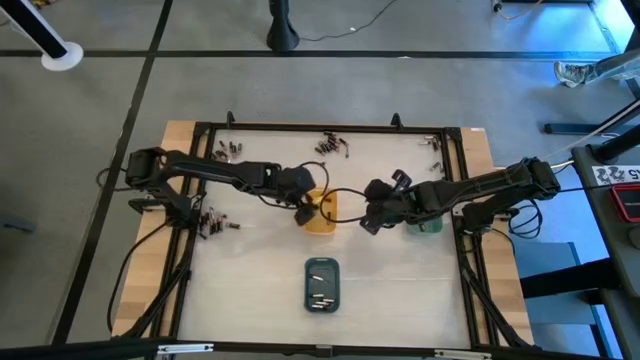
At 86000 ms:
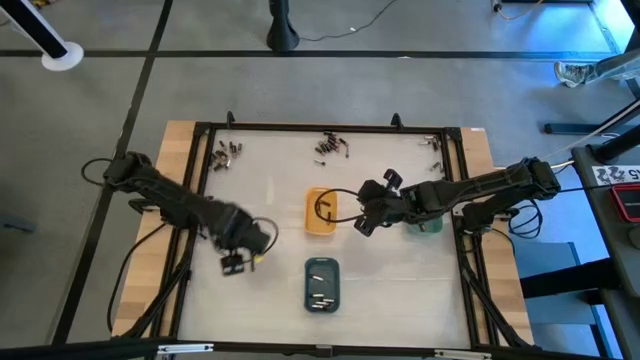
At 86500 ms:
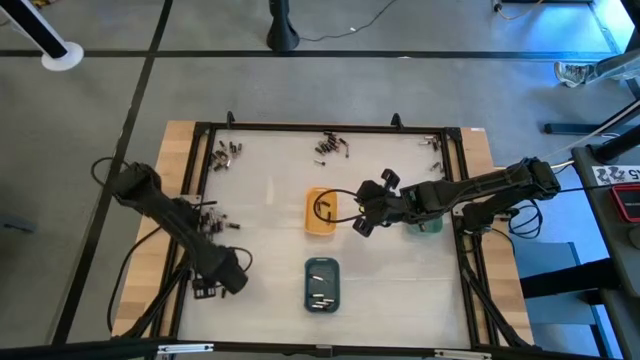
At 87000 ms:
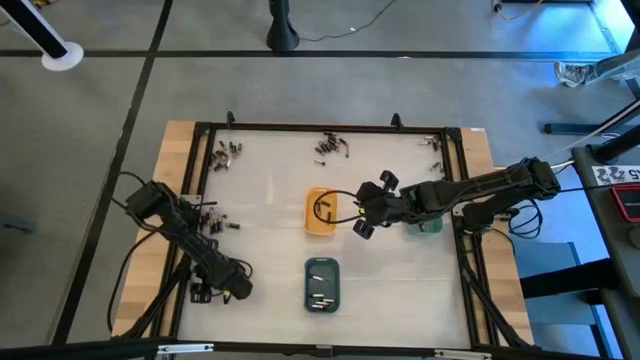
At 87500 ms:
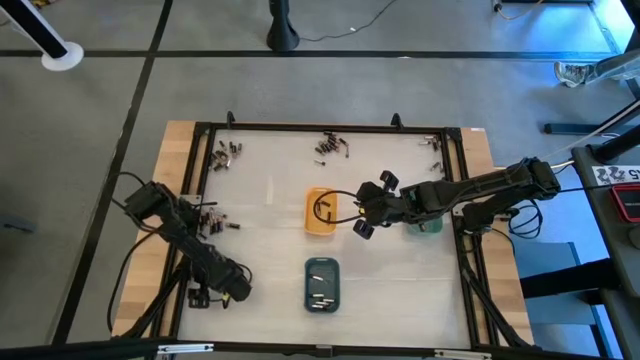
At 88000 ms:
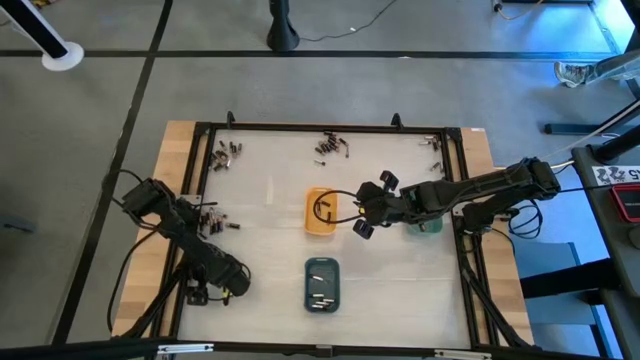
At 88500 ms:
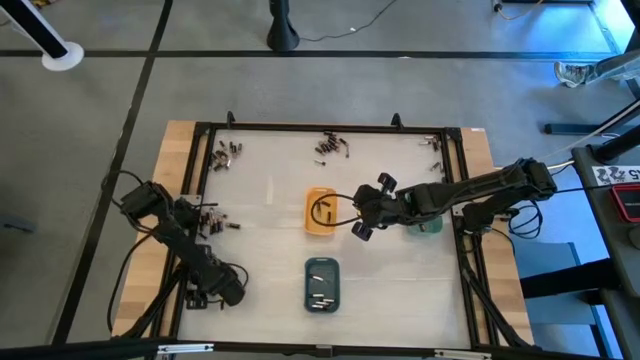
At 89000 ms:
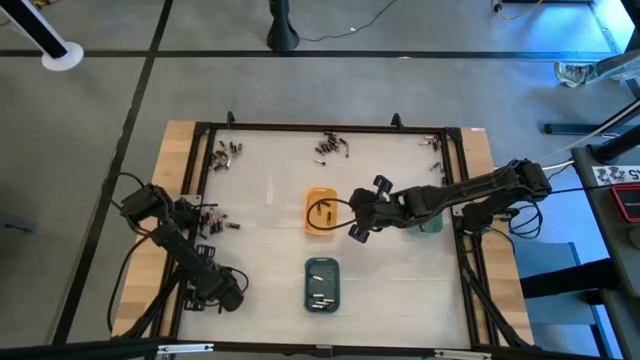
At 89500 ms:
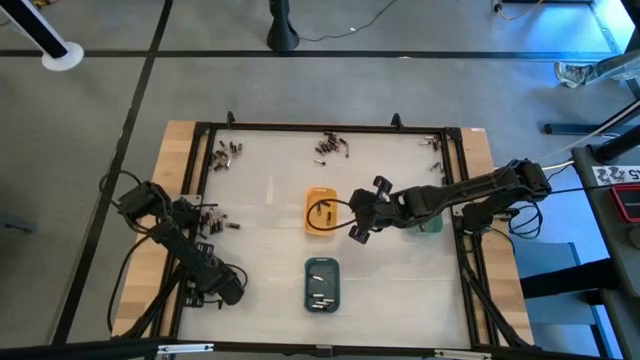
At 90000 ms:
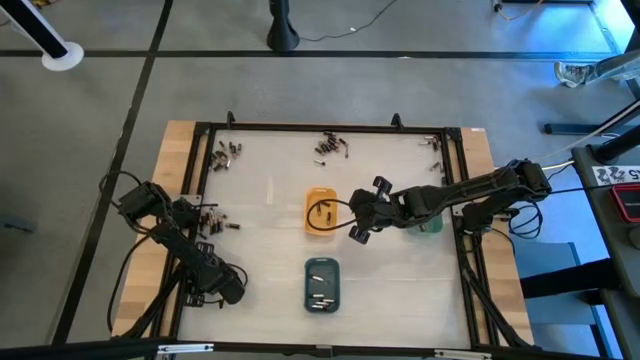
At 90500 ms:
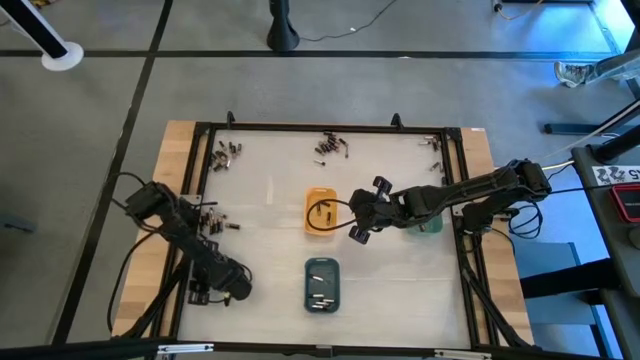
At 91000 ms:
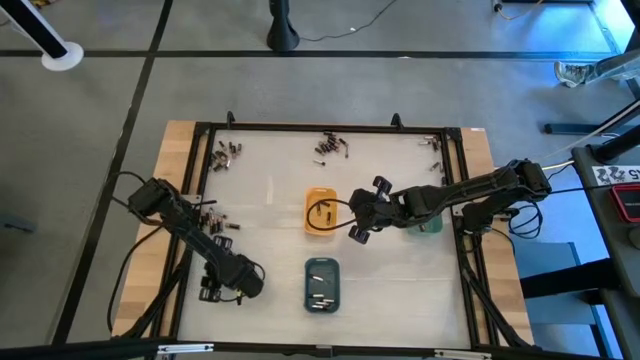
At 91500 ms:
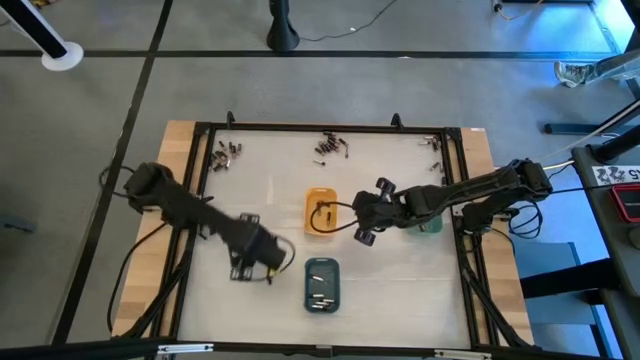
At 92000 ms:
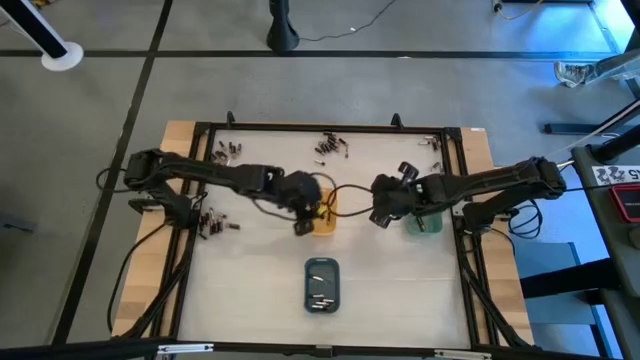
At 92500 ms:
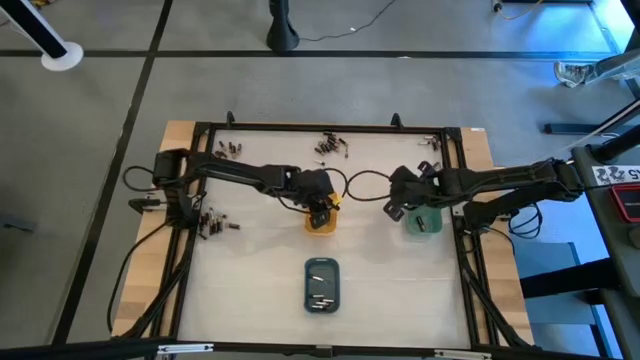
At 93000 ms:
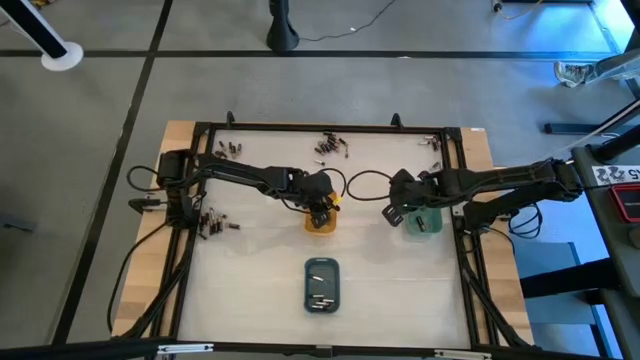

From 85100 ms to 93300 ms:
Task: Sort batteries
Put the black battery into the yellow bin

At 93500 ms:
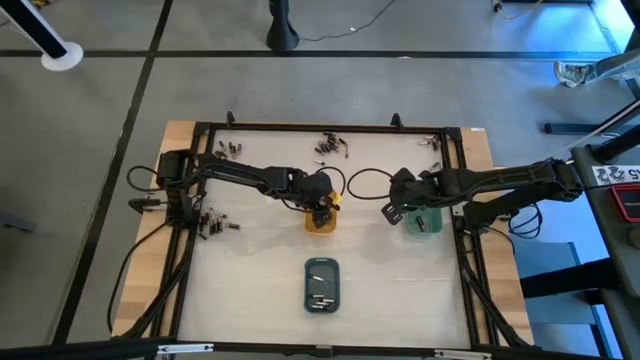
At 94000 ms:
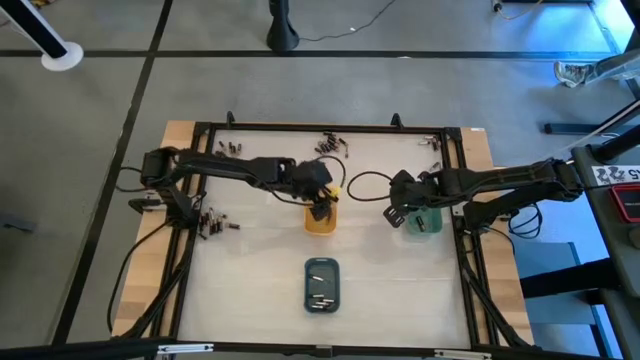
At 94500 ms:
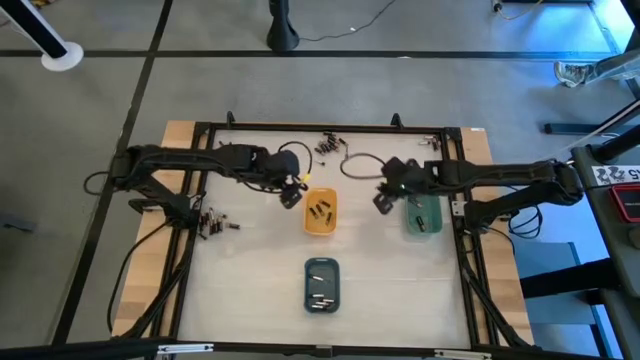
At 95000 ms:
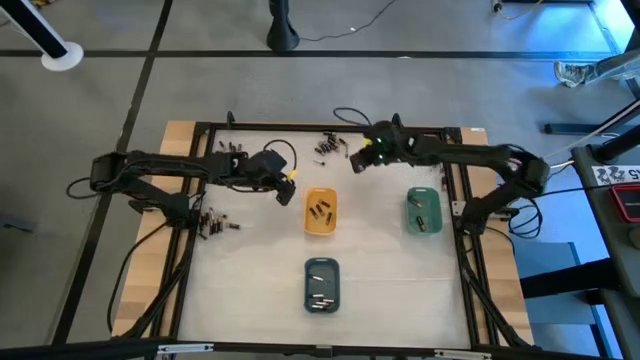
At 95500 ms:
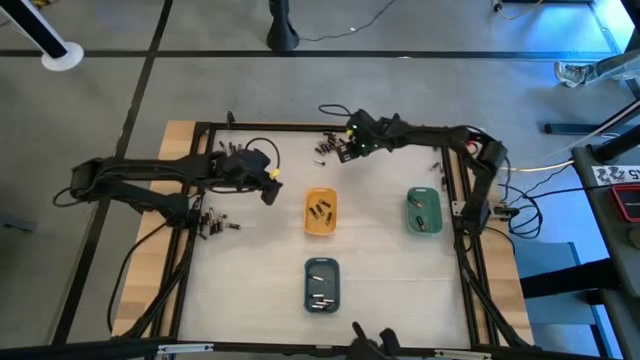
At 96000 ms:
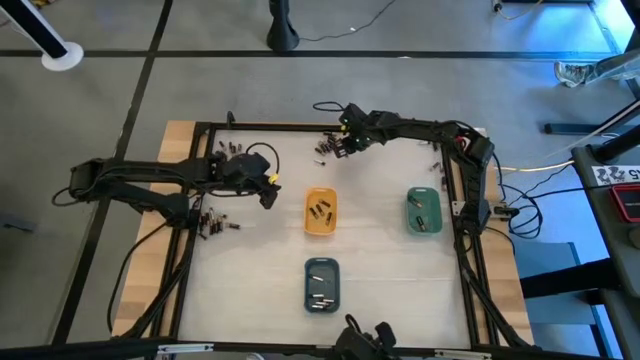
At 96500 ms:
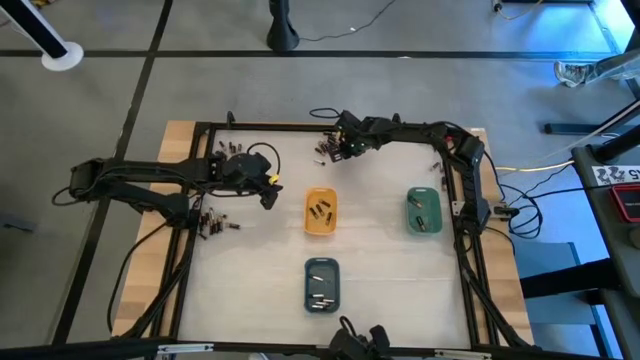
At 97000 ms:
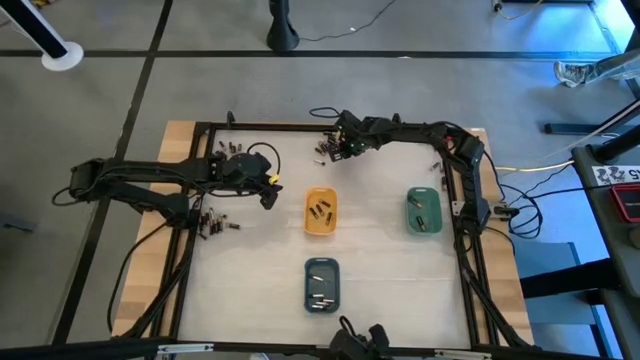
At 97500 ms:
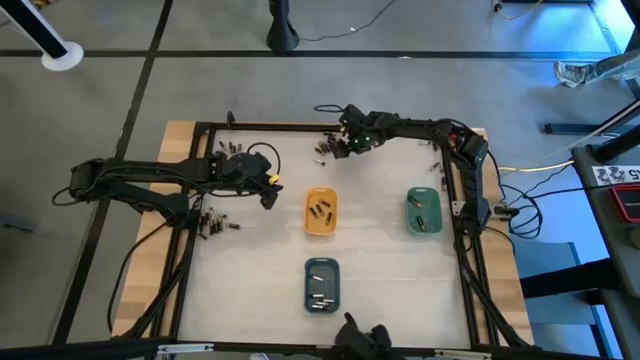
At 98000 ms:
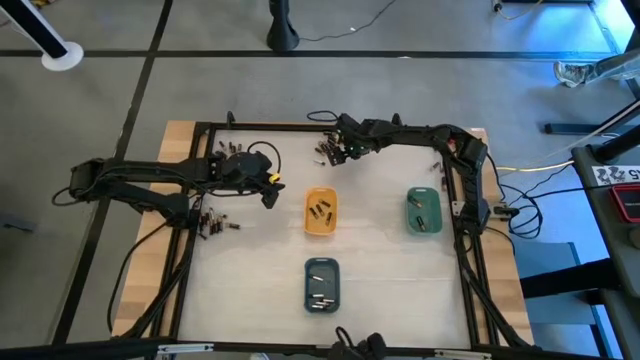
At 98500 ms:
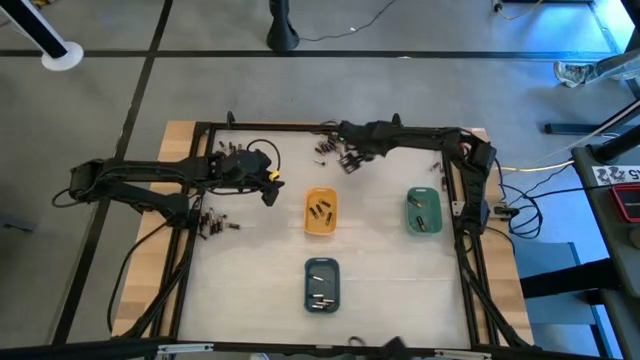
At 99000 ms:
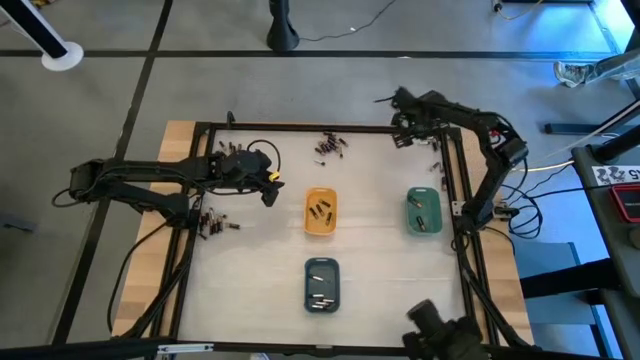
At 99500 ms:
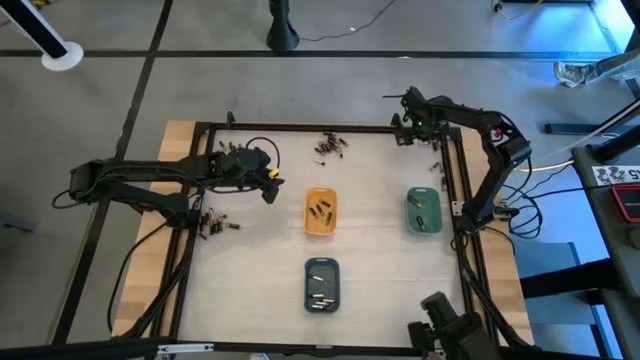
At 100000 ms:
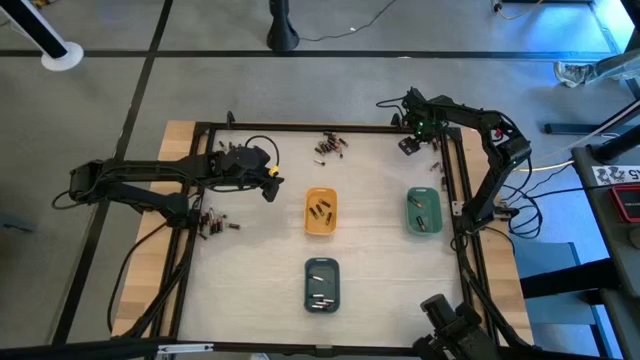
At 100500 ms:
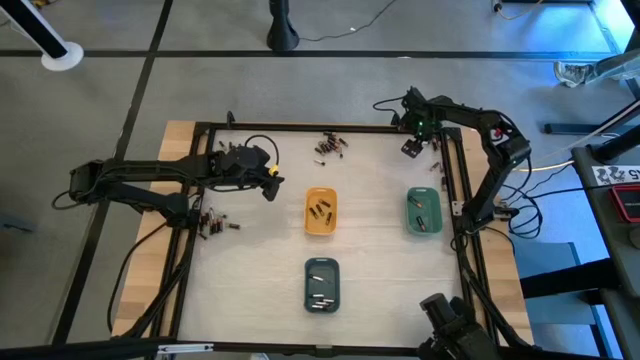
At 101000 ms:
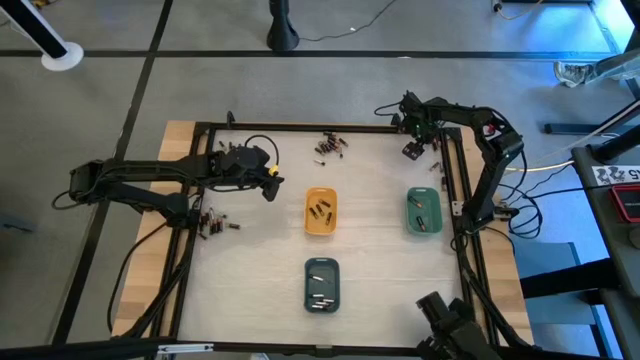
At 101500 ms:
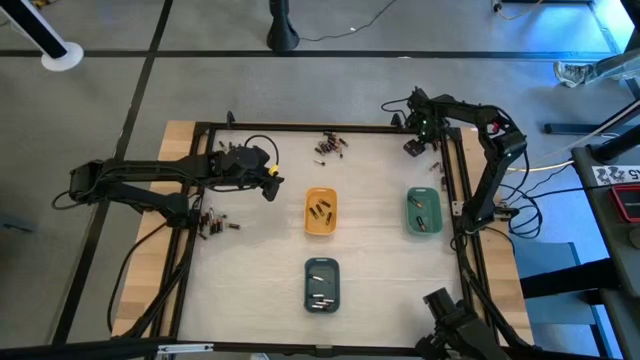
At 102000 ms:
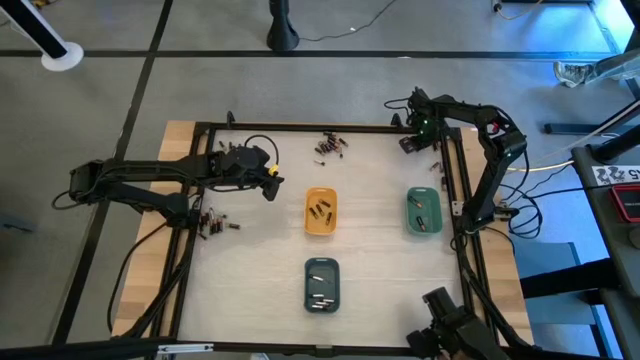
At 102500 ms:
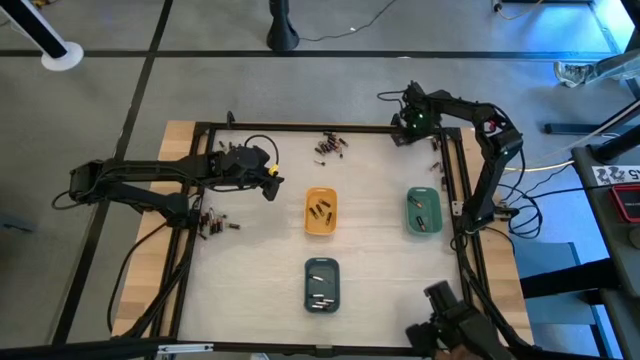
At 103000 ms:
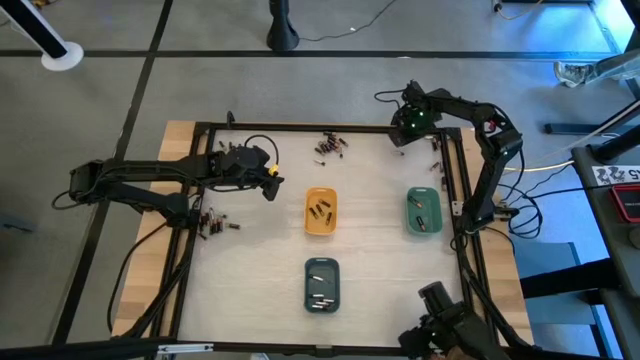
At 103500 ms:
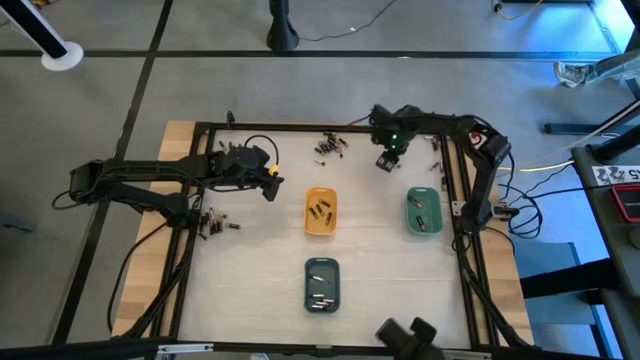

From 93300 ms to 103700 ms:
Put the top right energizer AAA battery into the blue bin

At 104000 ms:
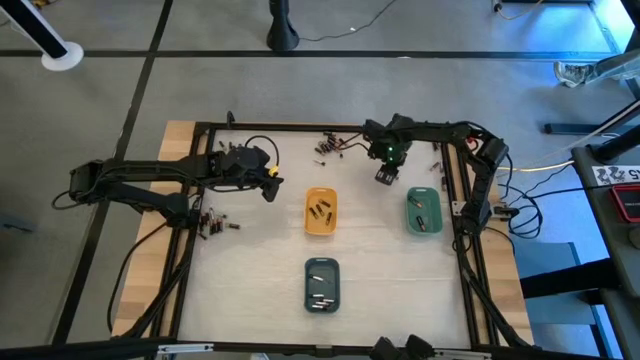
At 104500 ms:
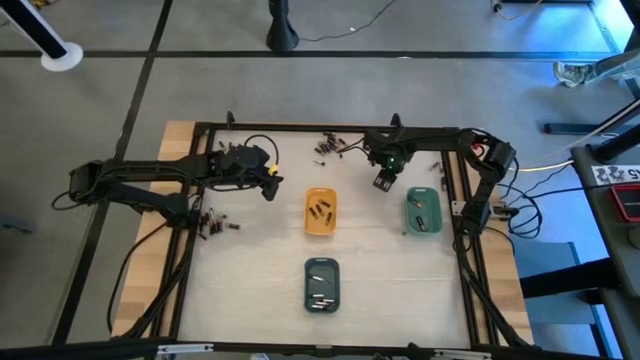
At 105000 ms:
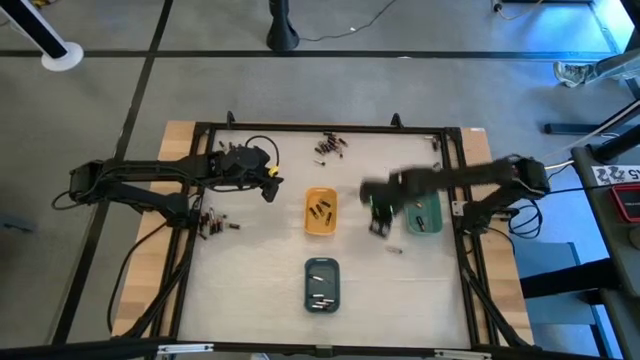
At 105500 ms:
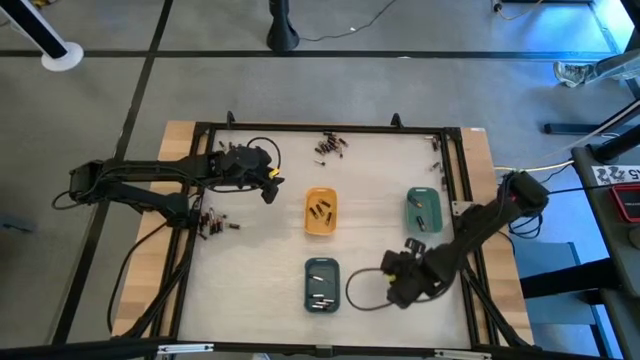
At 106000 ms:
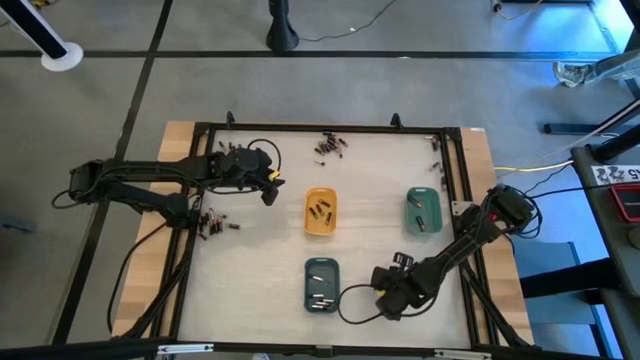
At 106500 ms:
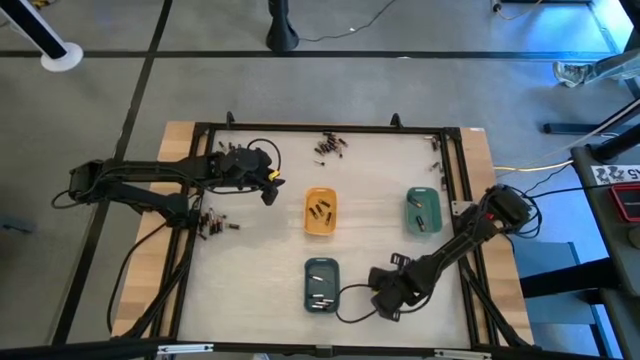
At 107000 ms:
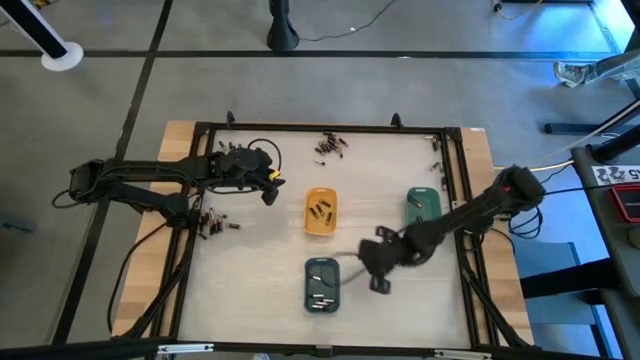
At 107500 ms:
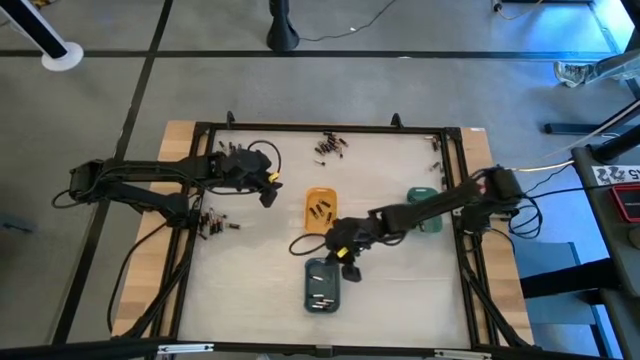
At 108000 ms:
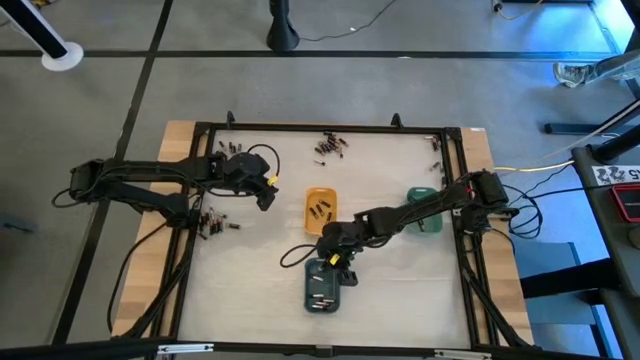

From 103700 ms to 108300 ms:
Put the silver battery into the blue bin
